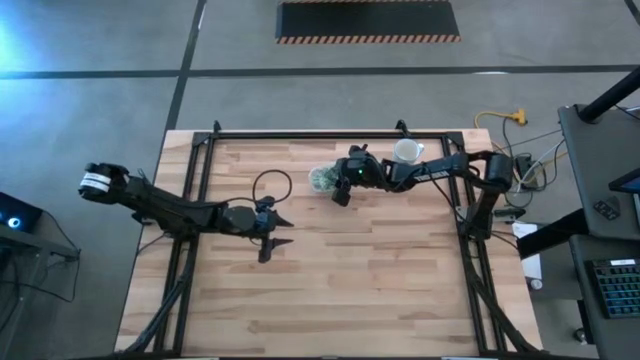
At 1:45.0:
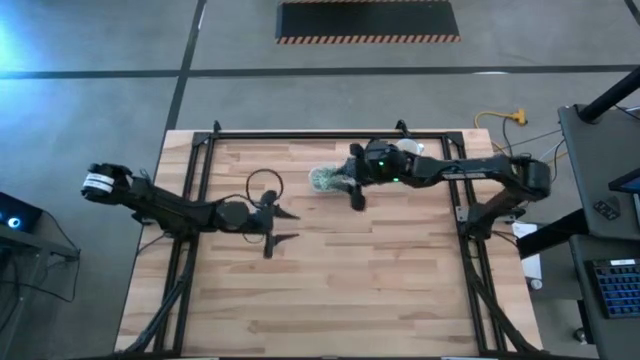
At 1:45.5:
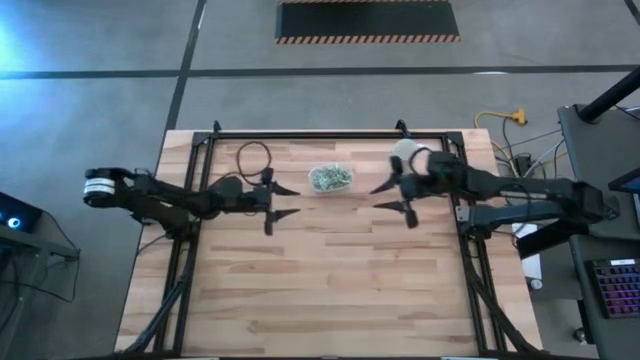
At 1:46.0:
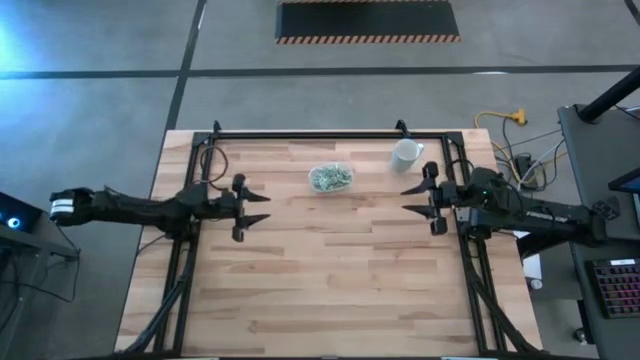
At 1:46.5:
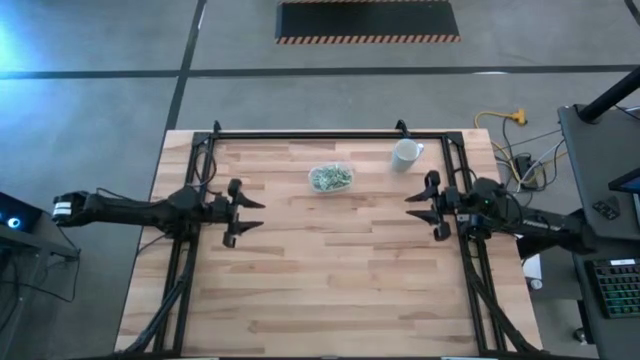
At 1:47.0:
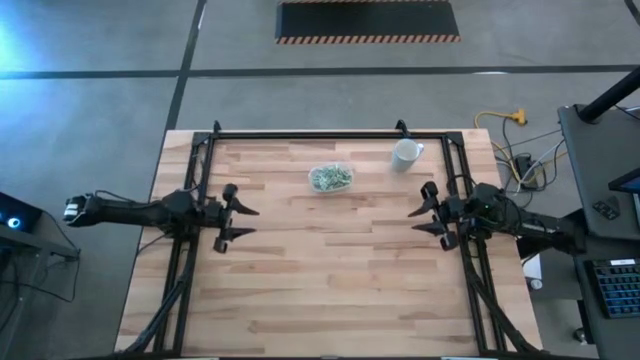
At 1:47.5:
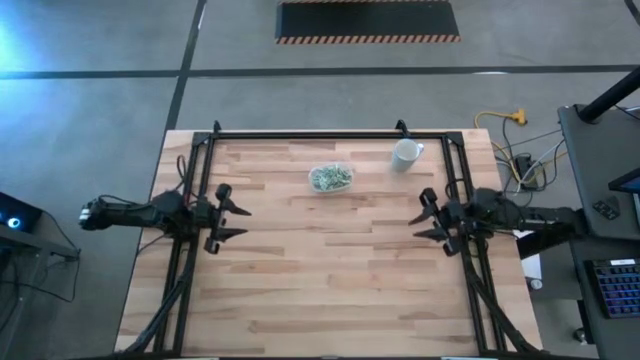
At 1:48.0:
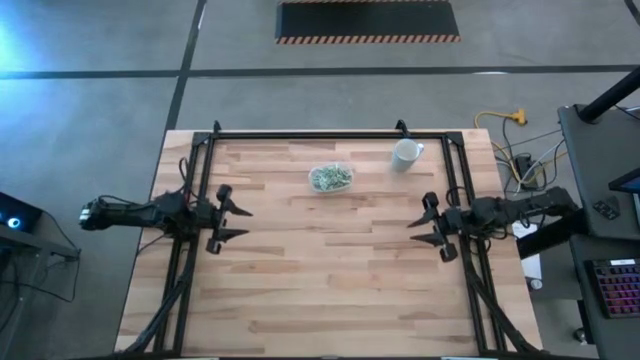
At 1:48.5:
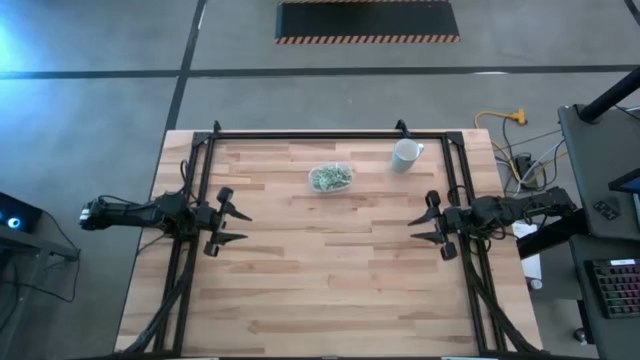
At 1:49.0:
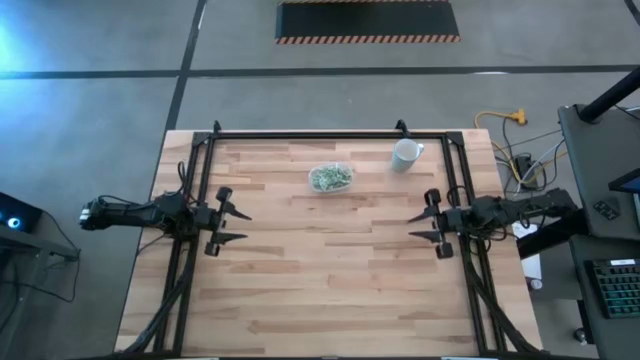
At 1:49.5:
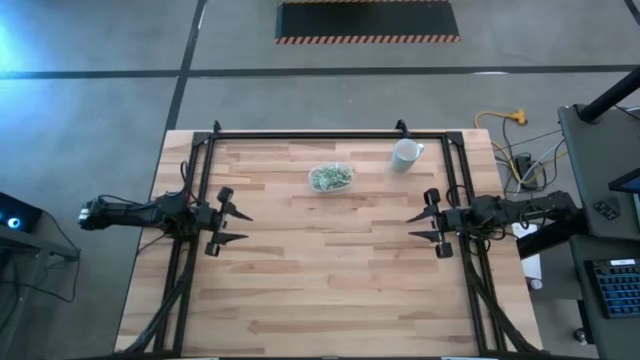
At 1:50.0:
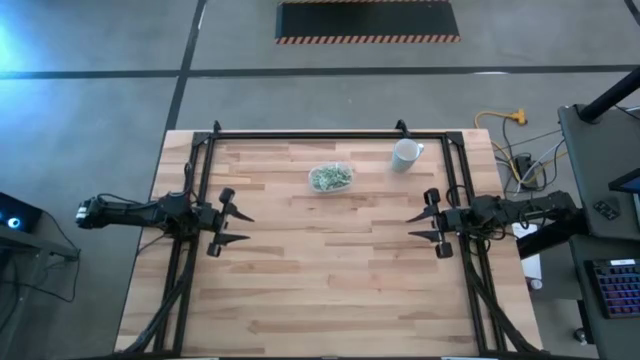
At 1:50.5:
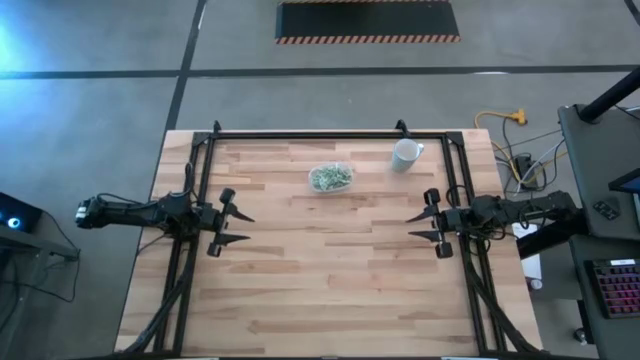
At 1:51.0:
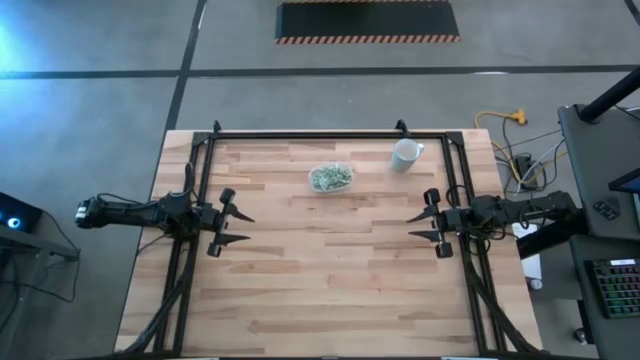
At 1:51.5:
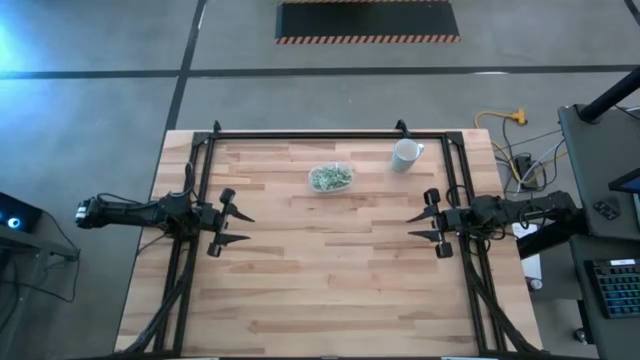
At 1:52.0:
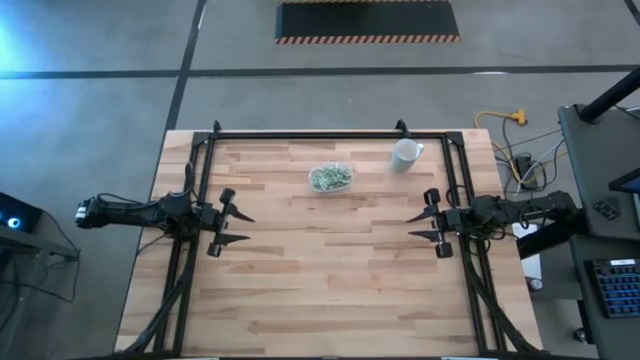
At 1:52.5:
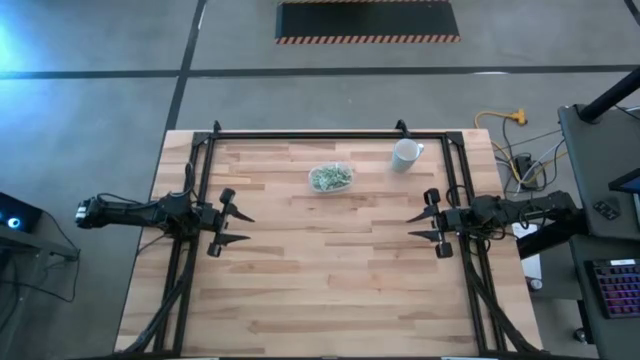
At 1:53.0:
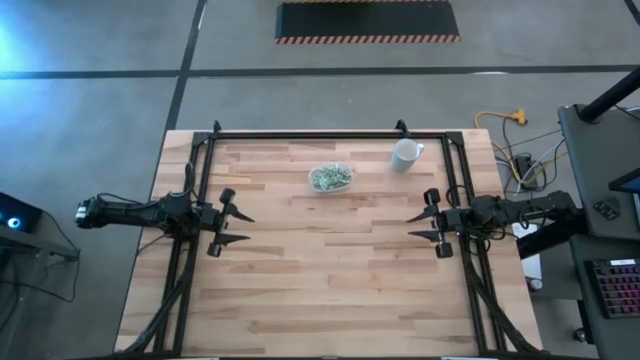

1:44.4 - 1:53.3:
Task: Pick and place Stevia / Truvia into bins
Return to Home Position

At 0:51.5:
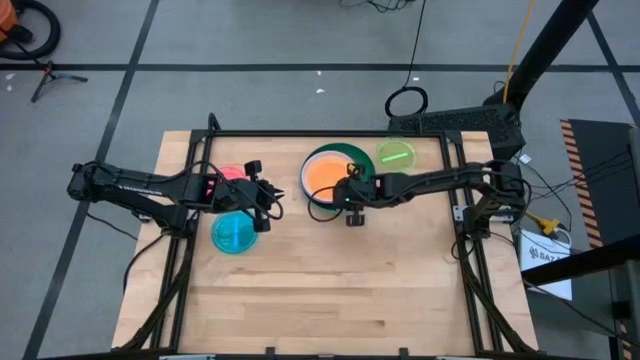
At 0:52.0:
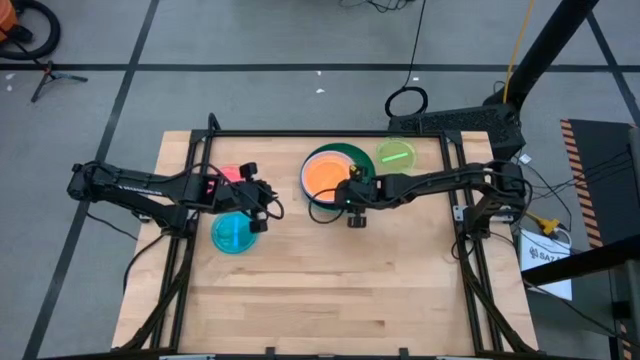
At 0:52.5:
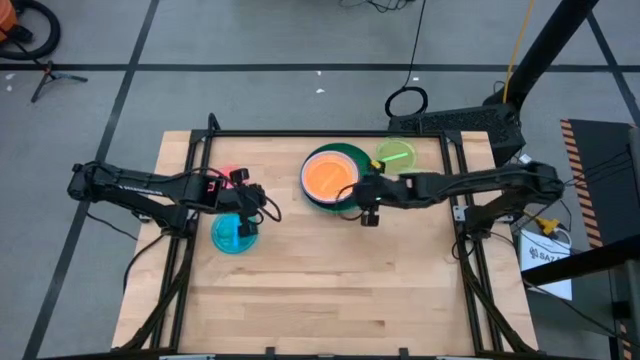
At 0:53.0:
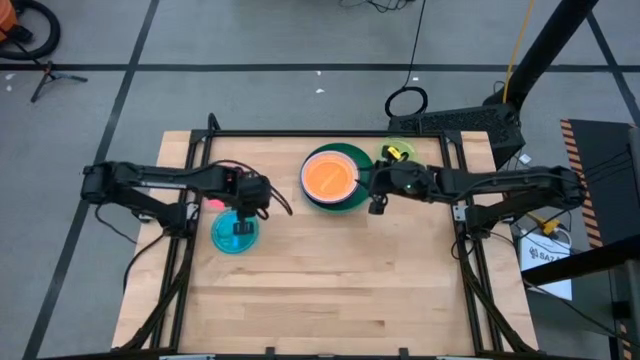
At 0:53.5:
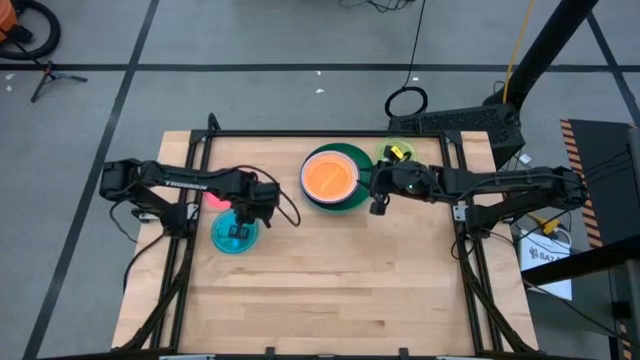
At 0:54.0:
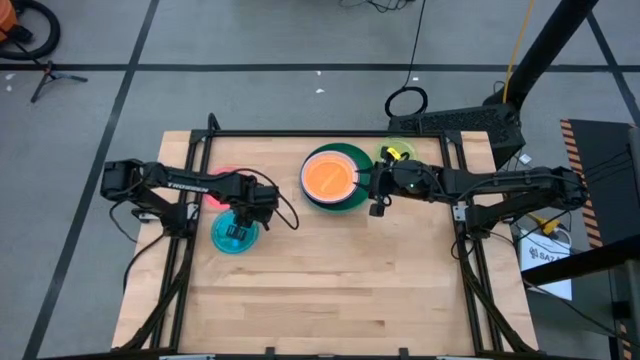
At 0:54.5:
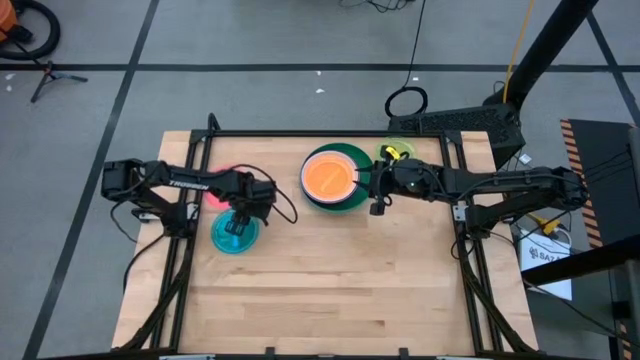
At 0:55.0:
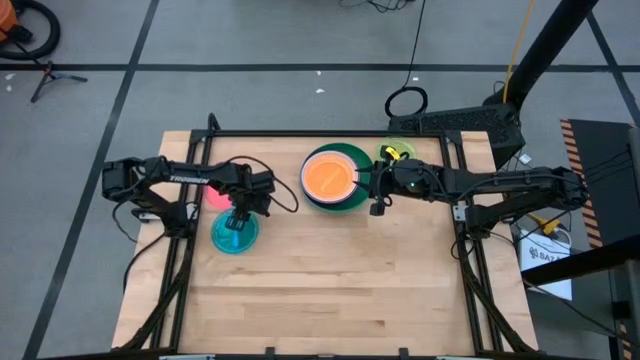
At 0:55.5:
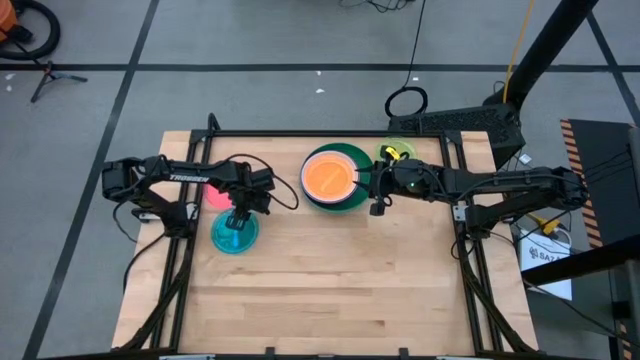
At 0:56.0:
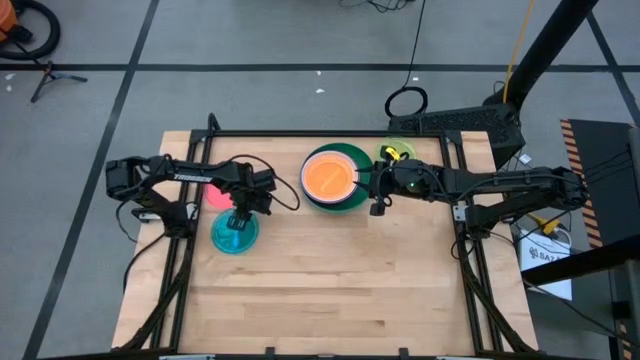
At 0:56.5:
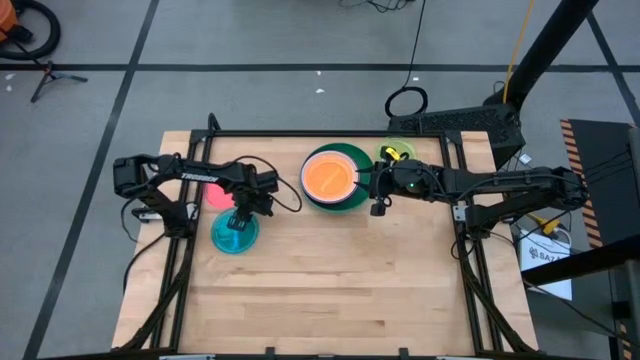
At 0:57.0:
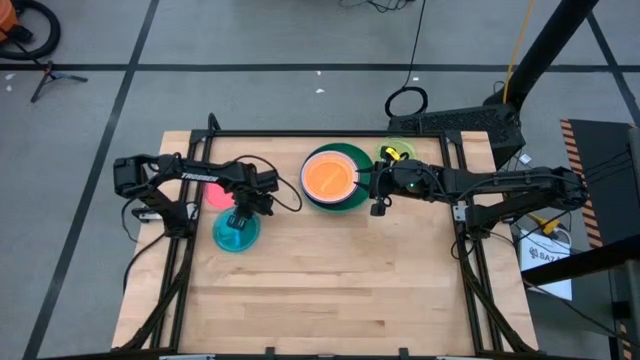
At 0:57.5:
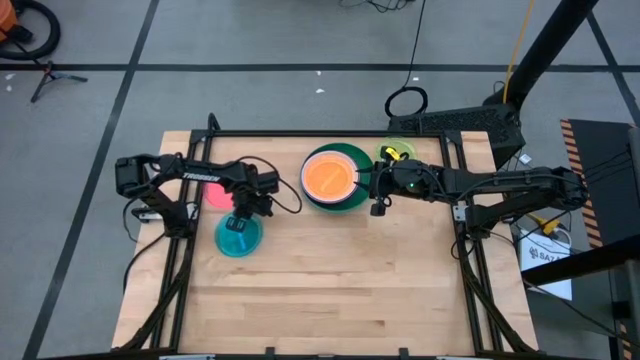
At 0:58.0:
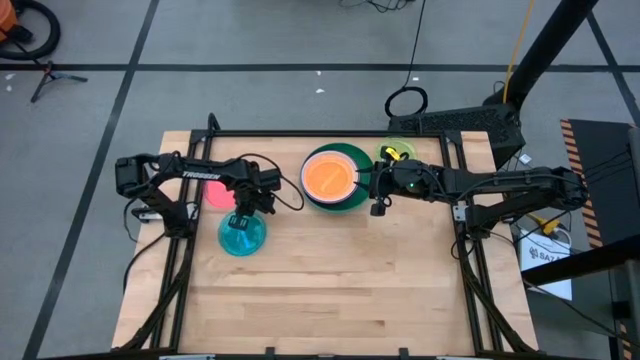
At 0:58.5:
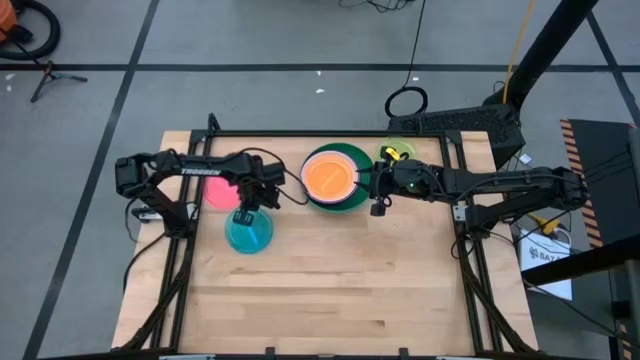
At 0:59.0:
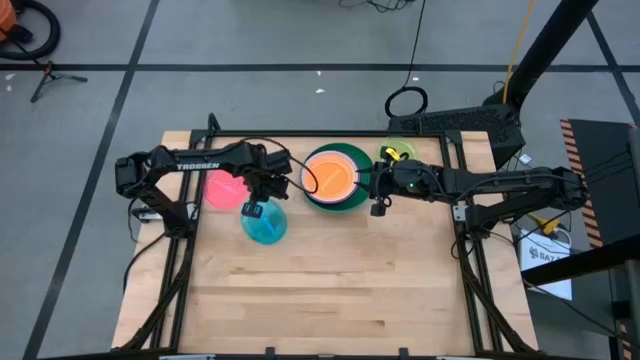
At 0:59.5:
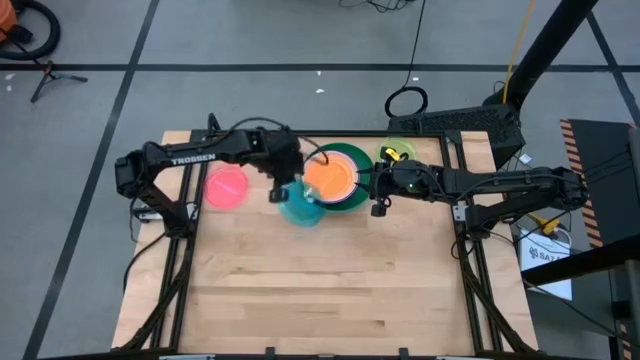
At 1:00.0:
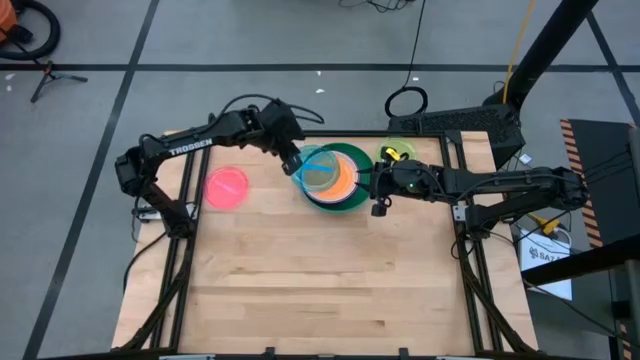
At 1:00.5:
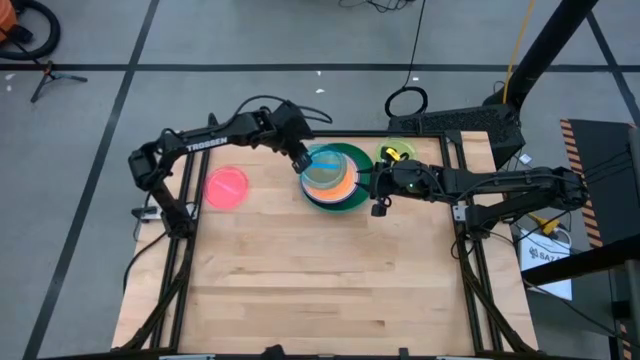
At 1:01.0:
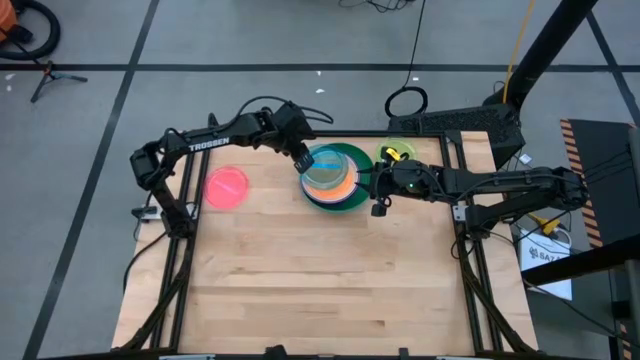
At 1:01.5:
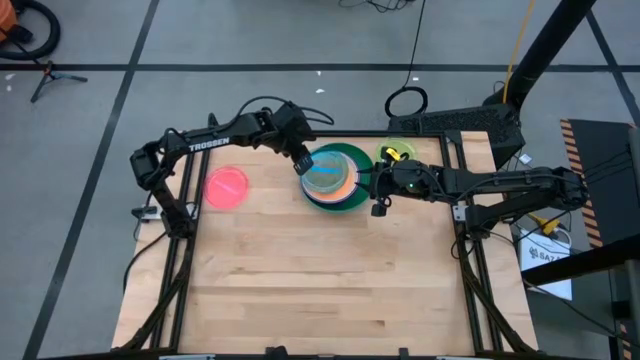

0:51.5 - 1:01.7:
Task: Stack plastic plates
Stack the blue plate on top of the orange plate
